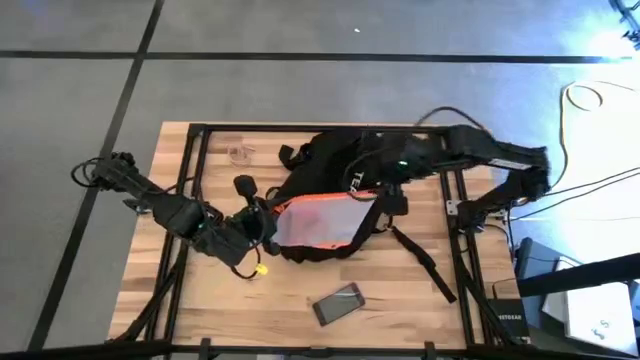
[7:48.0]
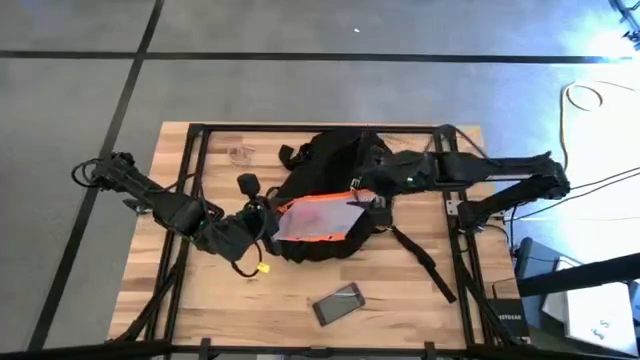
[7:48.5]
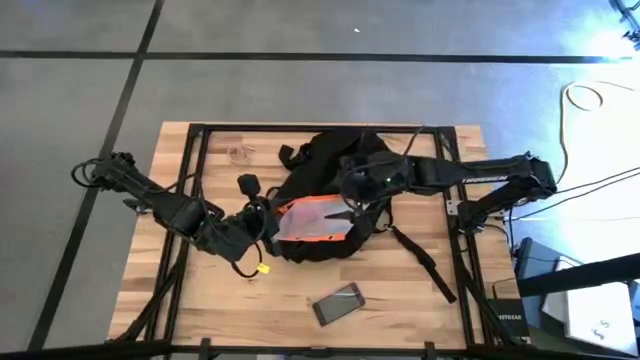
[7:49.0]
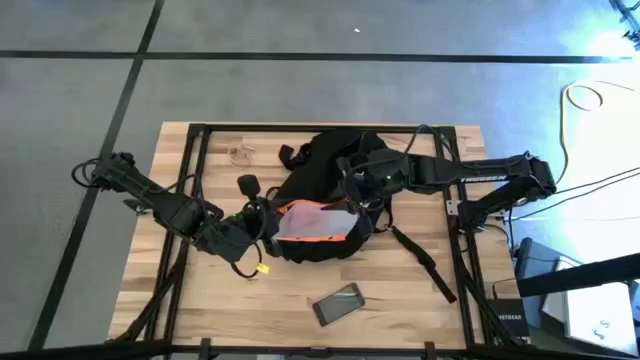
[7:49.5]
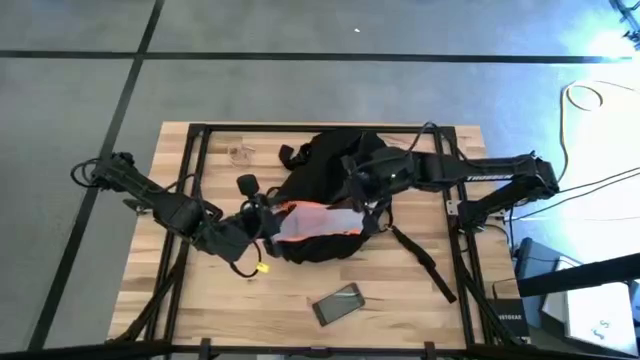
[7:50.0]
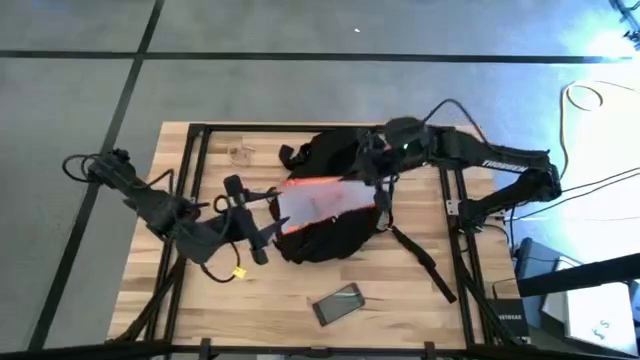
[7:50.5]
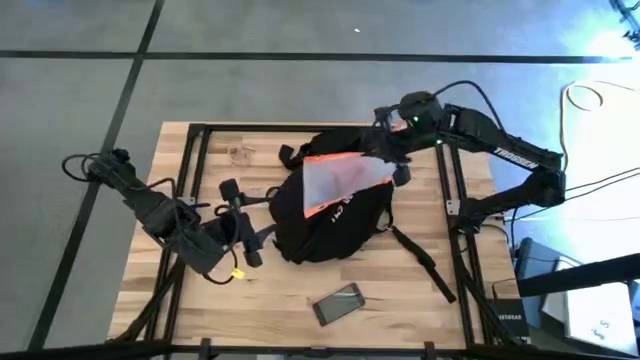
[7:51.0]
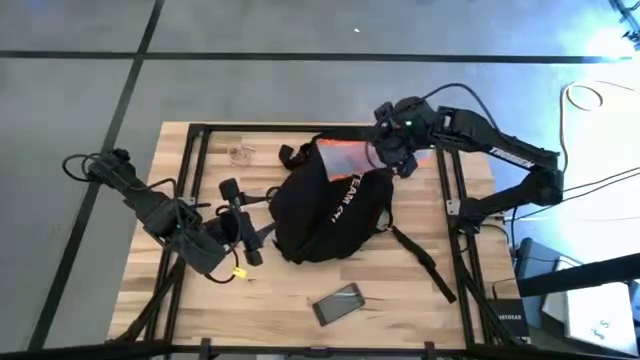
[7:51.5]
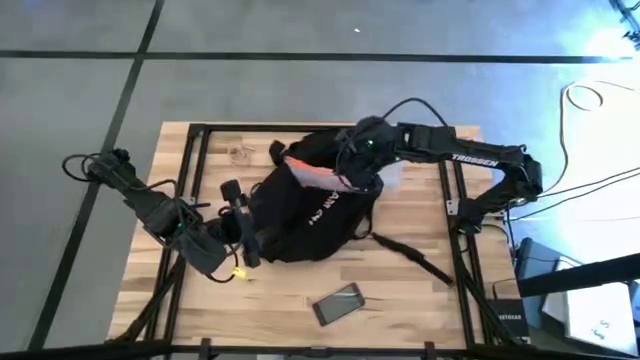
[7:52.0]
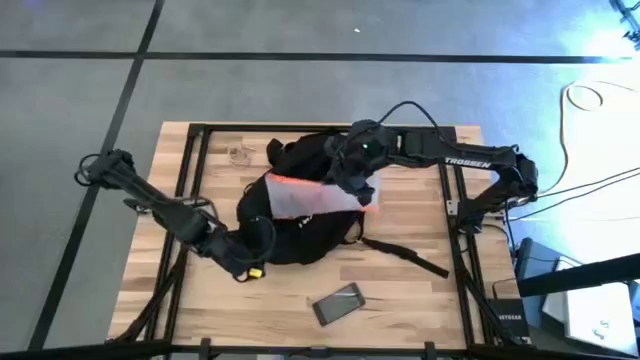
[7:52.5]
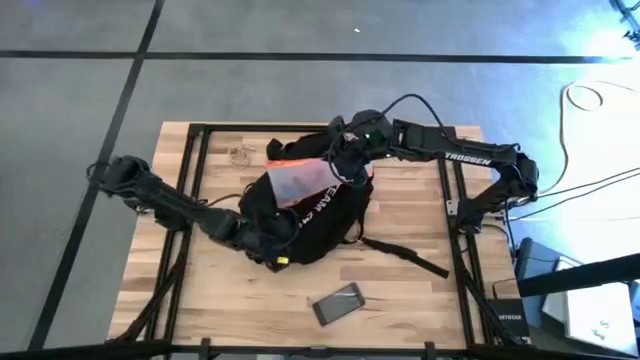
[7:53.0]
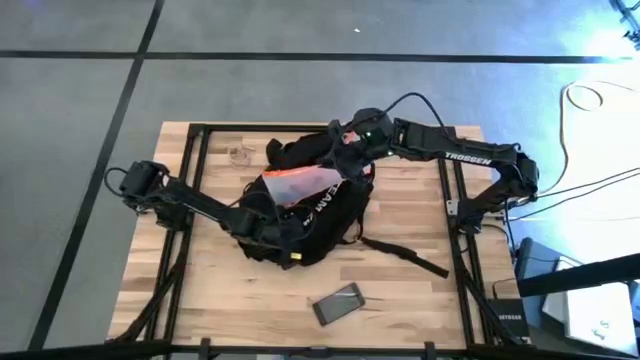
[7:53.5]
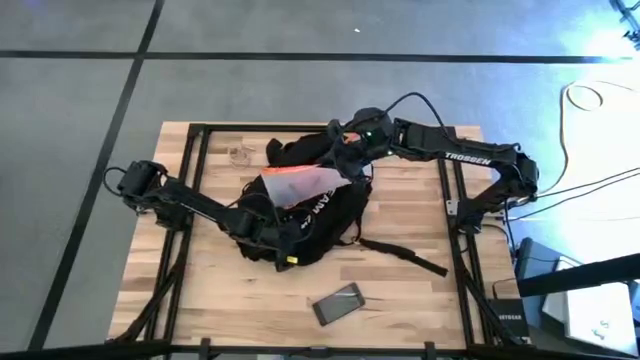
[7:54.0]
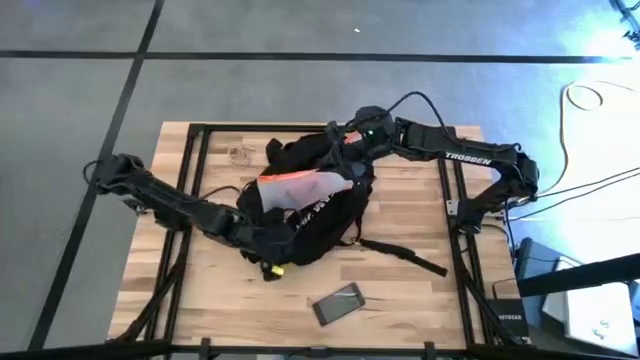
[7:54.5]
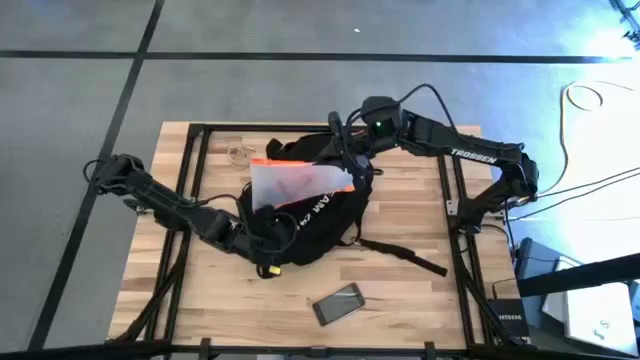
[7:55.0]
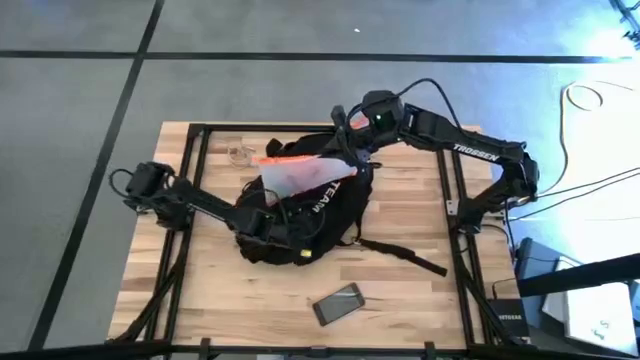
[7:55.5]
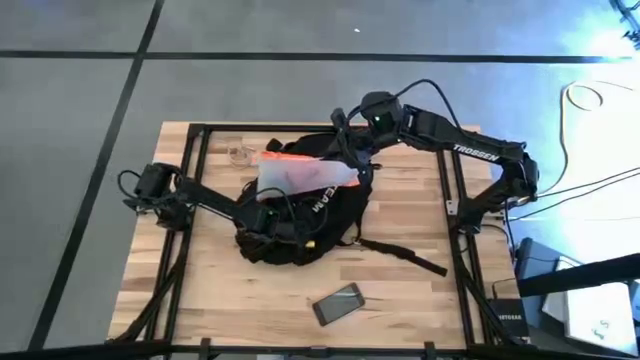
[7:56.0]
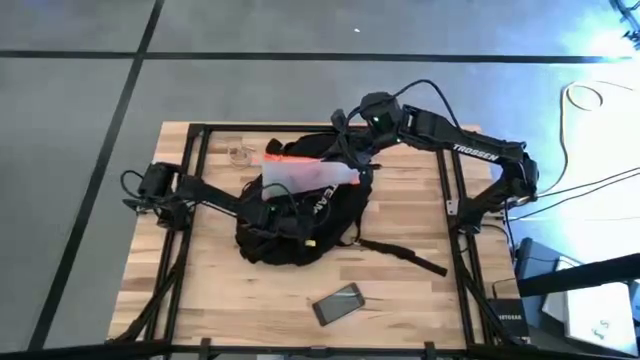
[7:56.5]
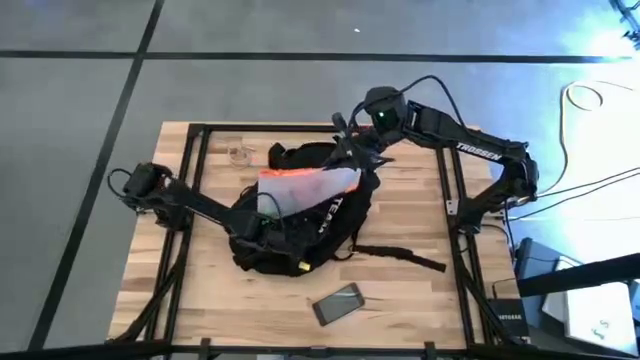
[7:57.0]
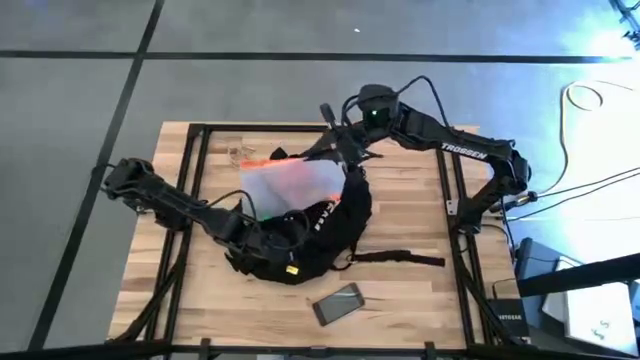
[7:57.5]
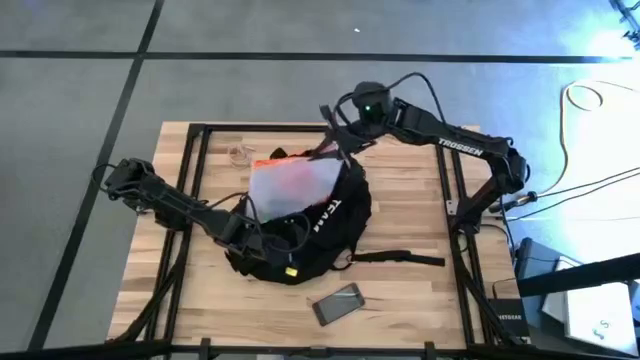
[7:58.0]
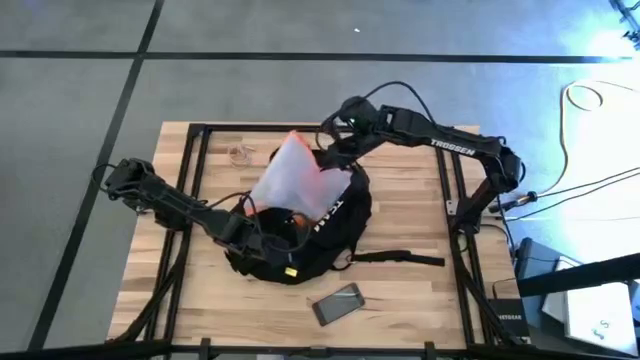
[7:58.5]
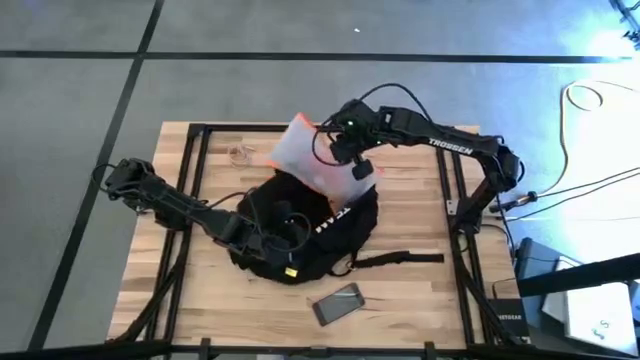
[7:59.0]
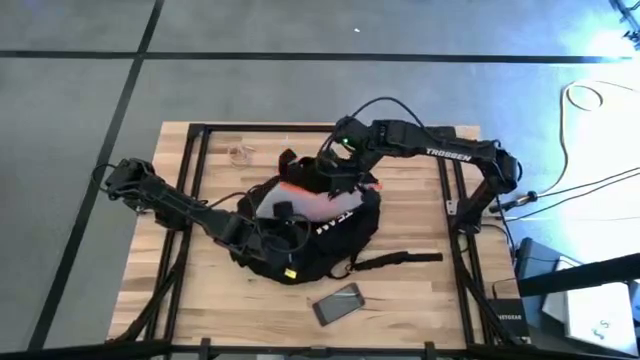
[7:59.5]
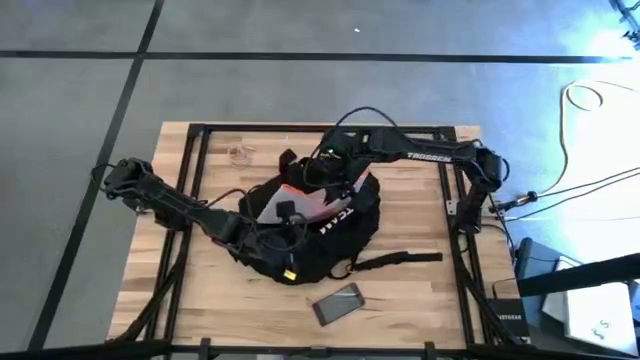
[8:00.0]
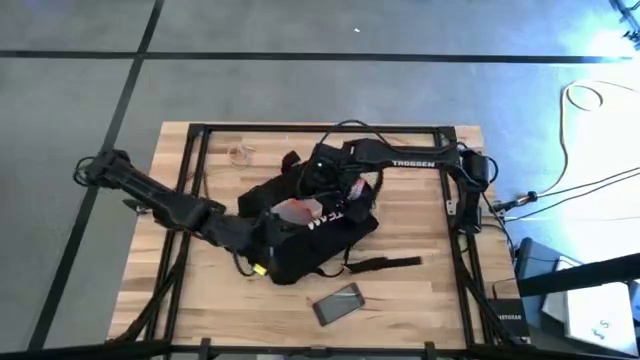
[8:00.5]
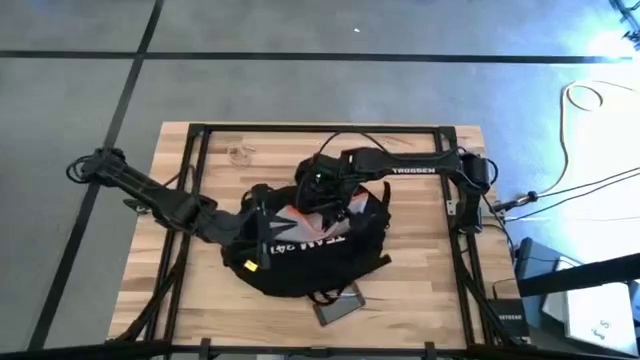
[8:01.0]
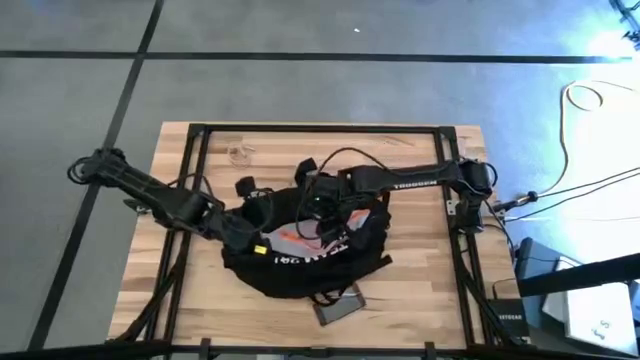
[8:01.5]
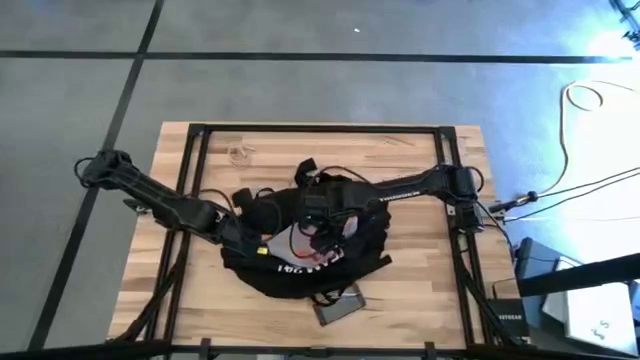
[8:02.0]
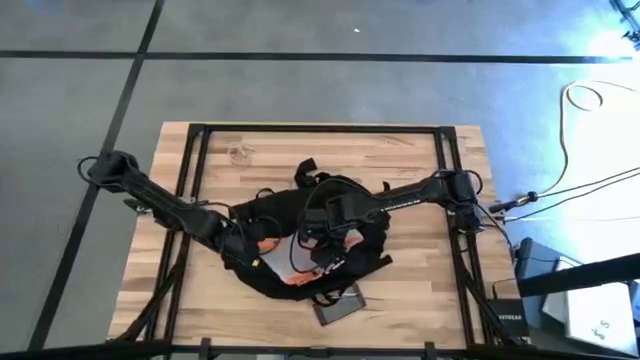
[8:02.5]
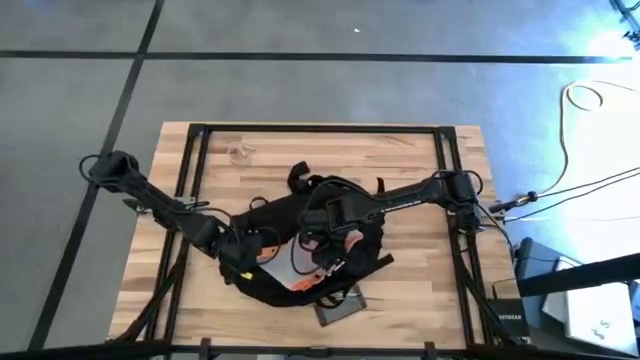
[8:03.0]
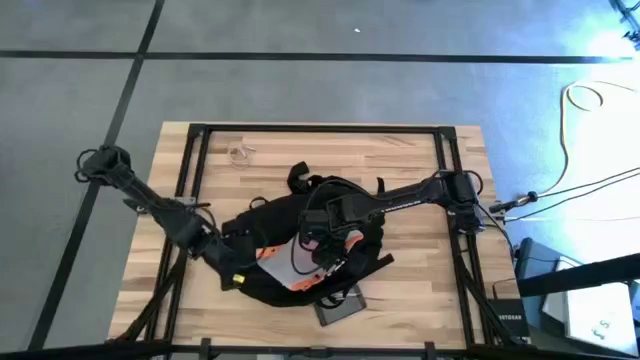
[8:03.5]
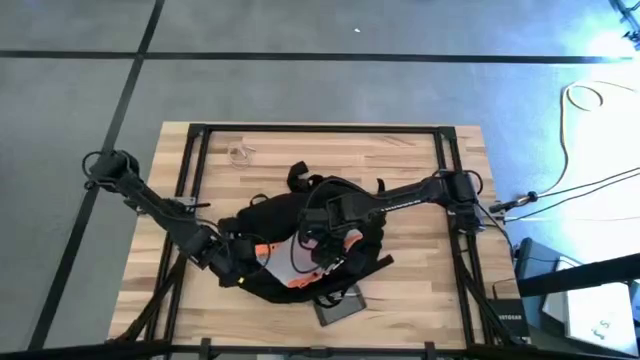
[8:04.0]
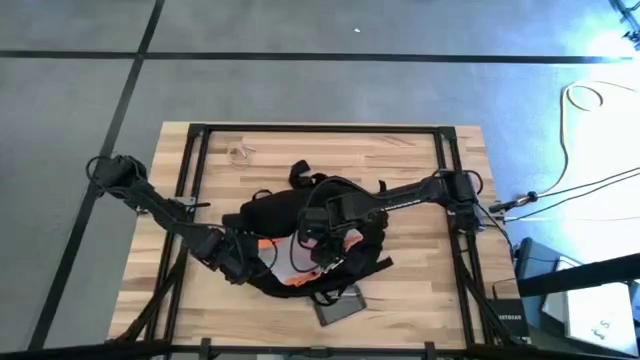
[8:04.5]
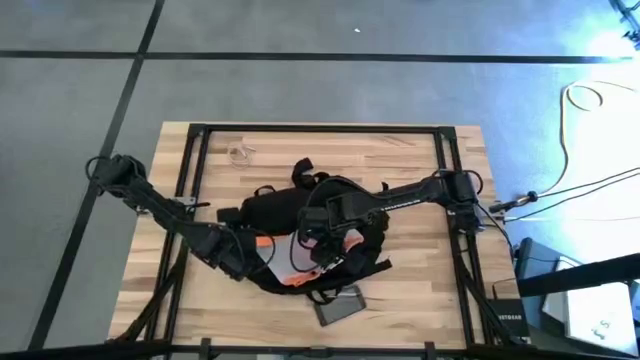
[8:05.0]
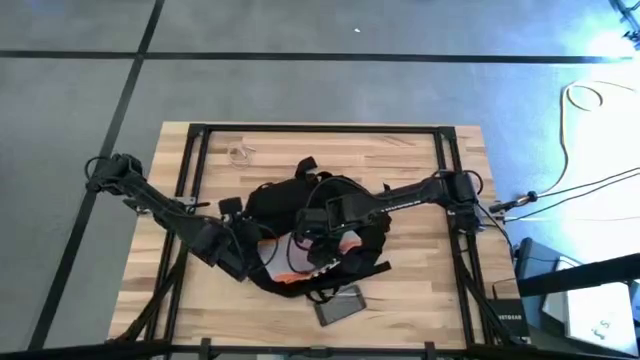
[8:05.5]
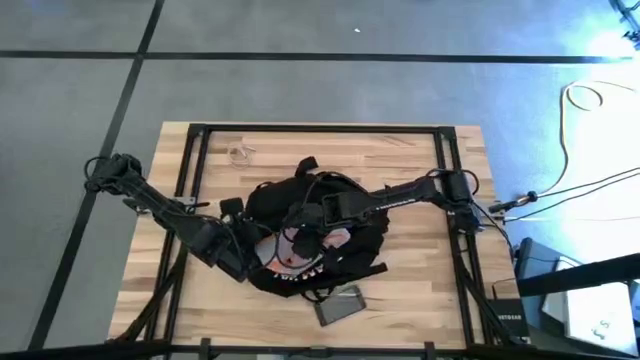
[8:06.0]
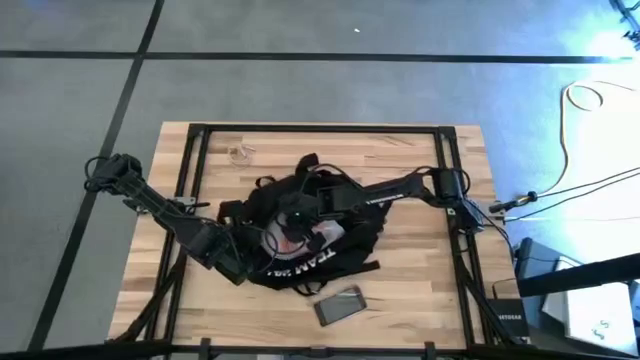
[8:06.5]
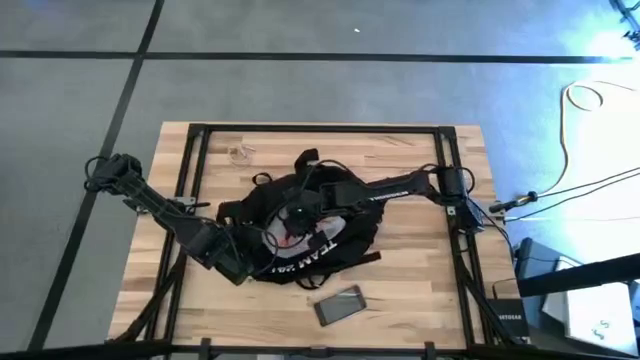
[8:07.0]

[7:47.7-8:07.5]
Task: Unpack backpack
Put the transparent white zip bag into the black backpack

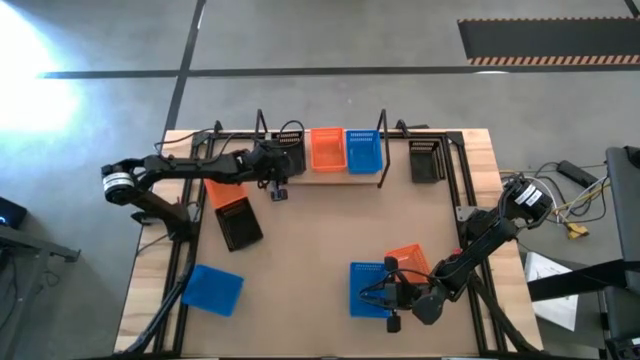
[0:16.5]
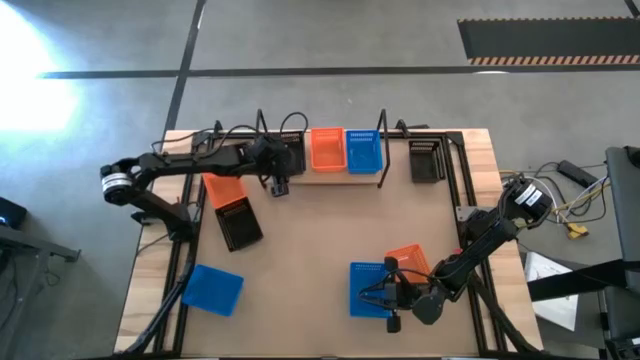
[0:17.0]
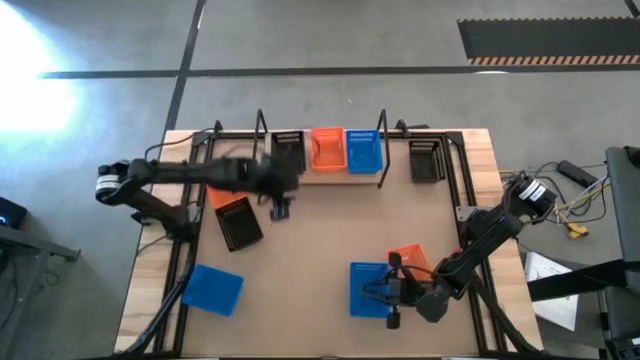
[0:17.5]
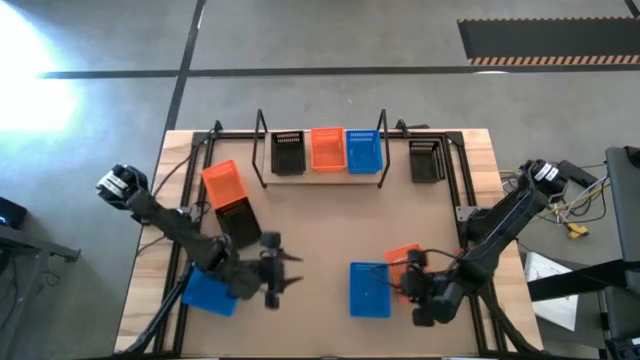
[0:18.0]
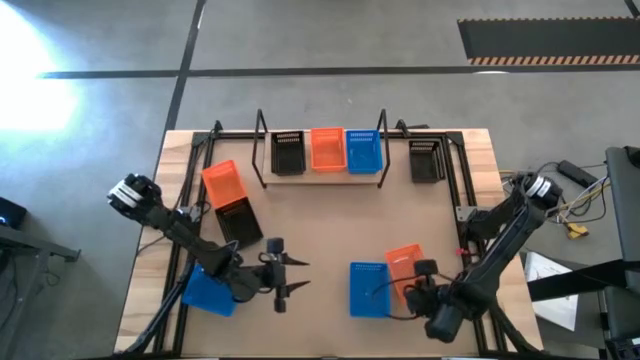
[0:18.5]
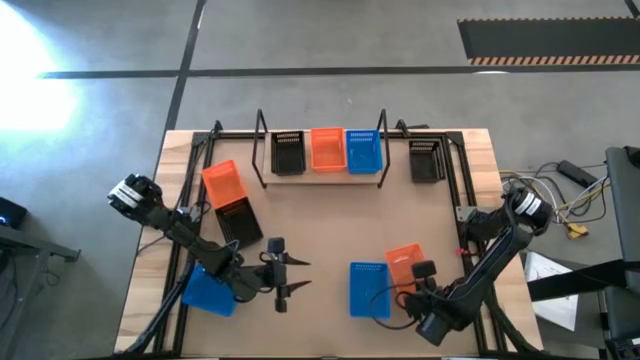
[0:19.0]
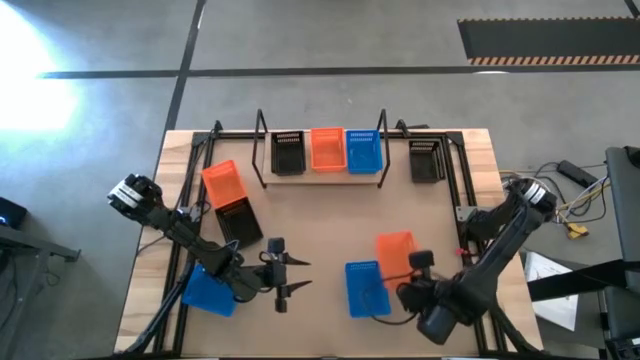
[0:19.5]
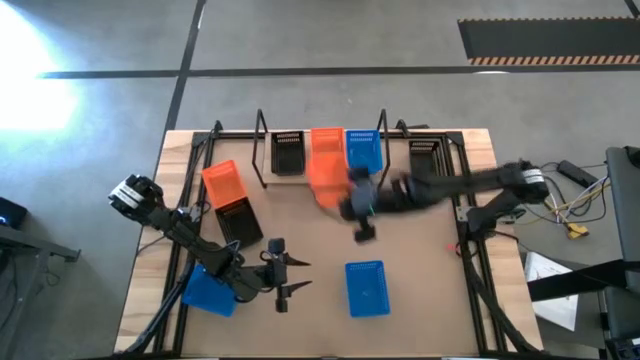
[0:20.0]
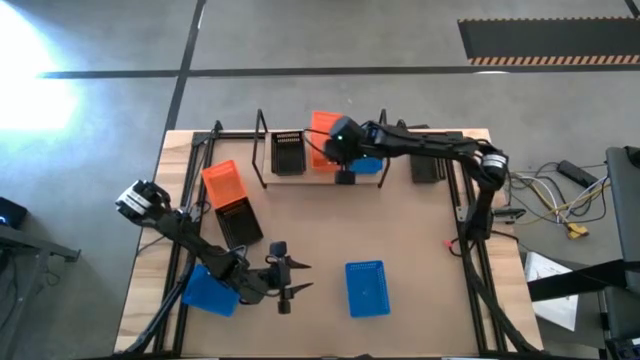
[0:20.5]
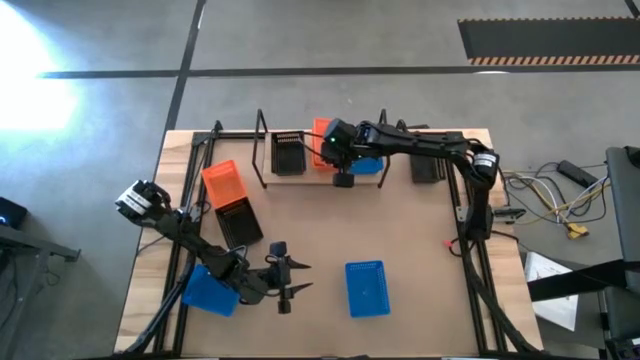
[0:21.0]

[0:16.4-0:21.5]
Task: Stack baskets on shelf by color
Stack the bottom orange bin on the orange bin on the shelf
